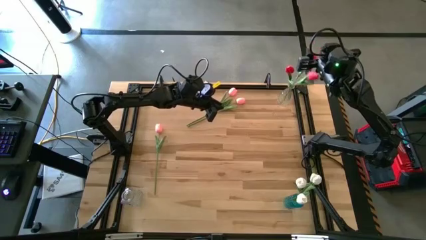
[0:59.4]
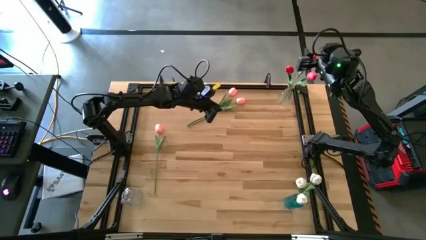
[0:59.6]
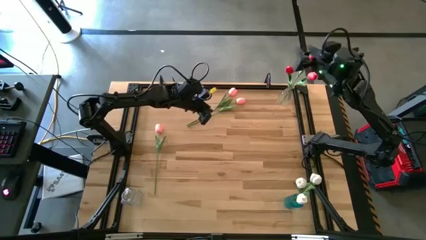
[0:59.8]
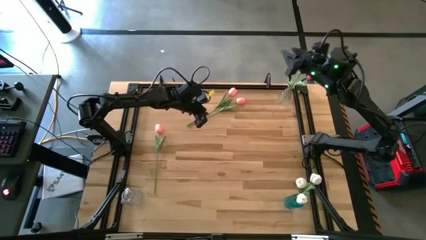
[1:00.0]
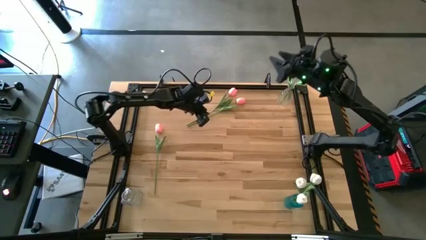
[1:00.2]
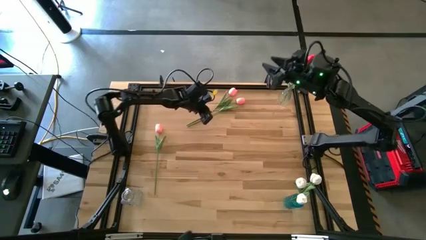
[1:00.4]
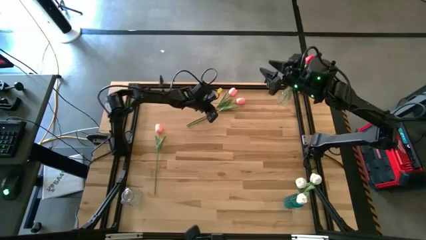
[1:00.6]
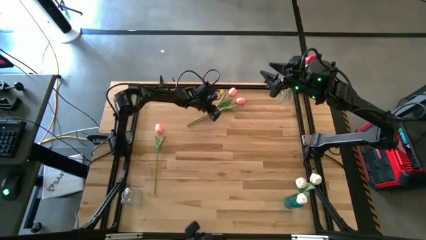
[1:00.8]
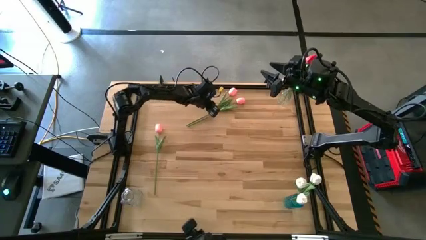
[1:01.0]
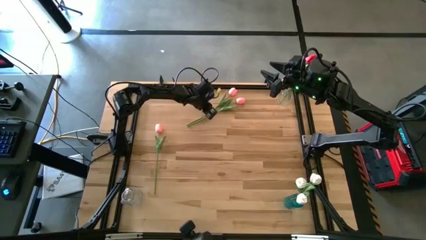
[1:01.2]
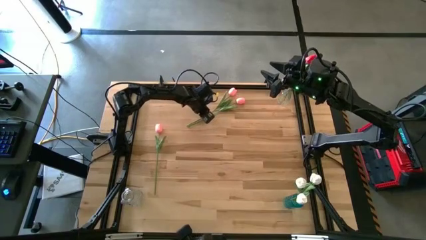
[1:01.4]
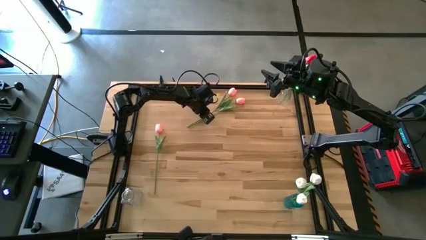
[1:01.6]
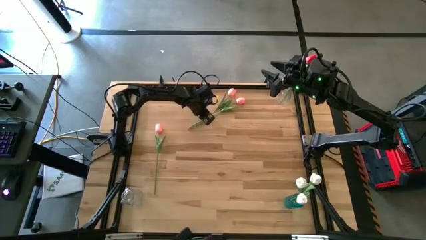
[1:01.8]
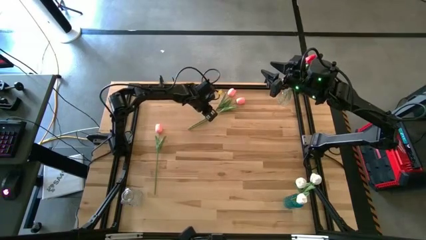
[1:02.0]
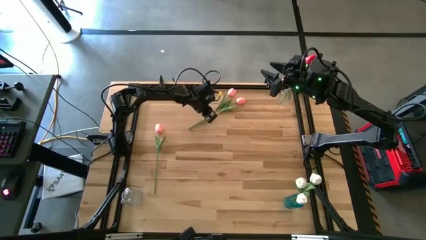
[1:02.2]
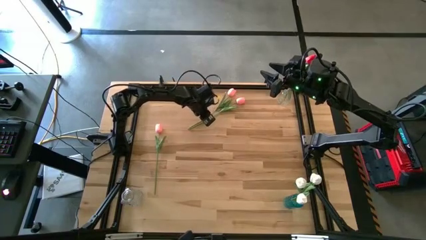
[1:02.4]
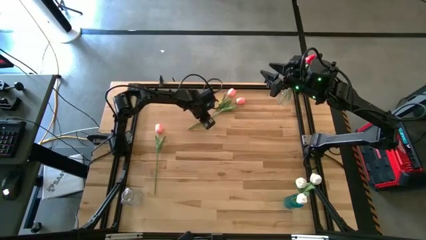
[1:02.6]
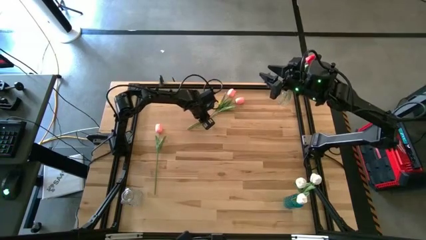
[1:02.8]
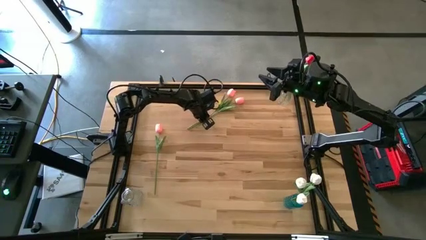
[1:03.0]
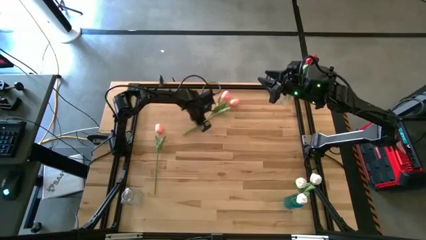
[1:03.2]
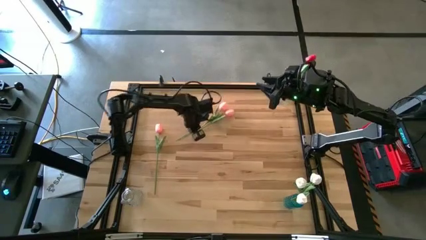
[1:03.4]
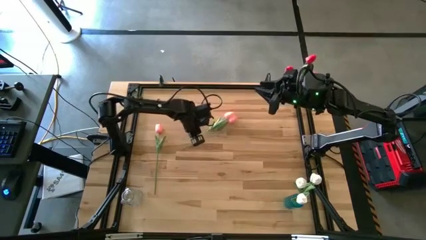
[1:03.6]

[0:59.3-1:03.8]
Task: Sort flowers into vase by color
Put the center pink flower into the bottom transparent vase

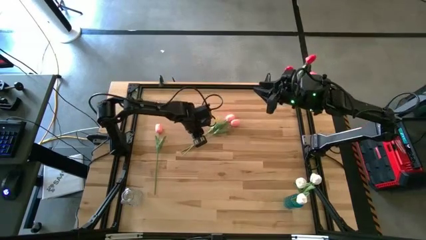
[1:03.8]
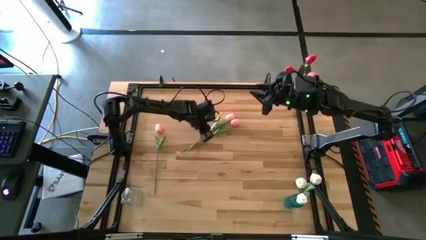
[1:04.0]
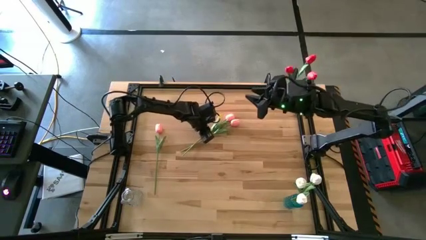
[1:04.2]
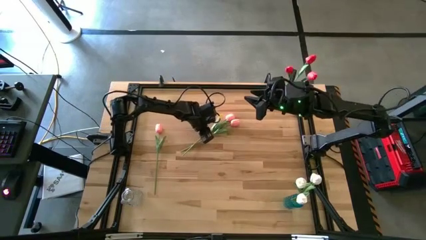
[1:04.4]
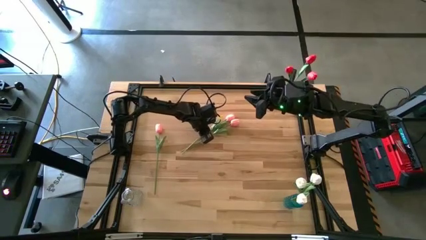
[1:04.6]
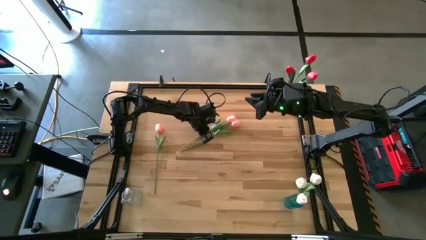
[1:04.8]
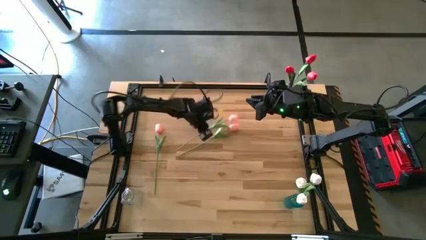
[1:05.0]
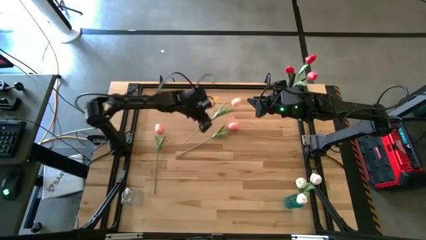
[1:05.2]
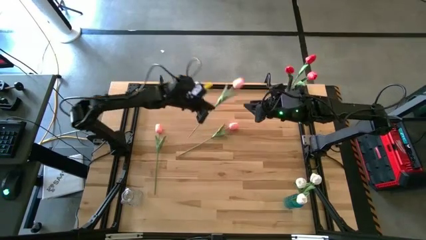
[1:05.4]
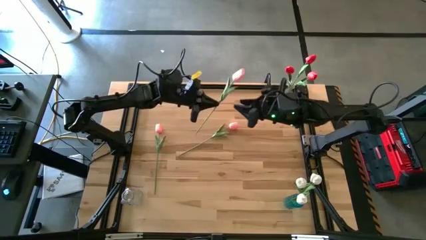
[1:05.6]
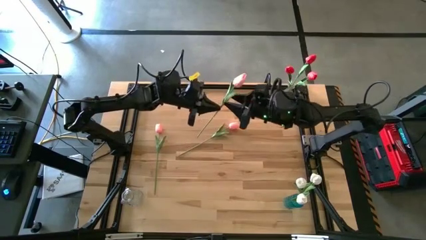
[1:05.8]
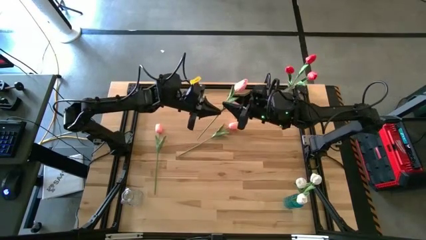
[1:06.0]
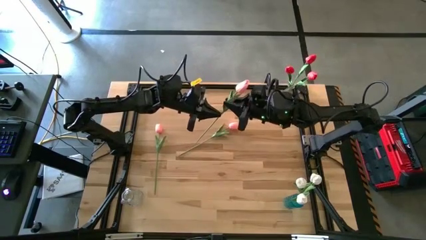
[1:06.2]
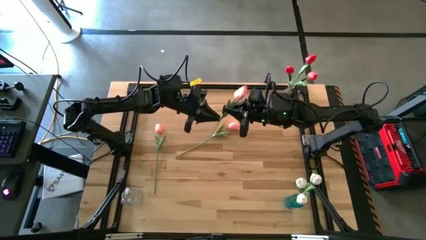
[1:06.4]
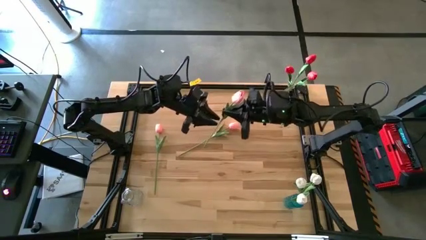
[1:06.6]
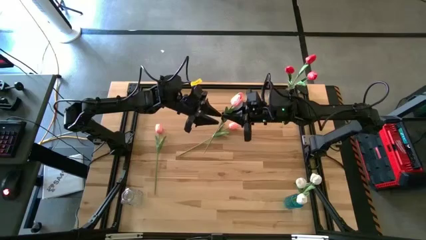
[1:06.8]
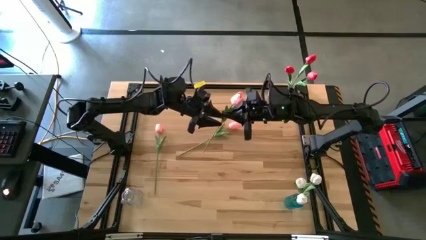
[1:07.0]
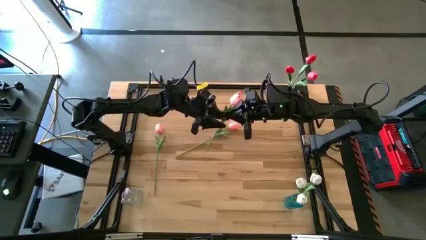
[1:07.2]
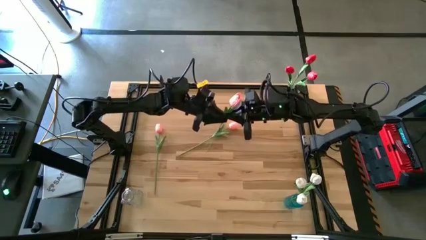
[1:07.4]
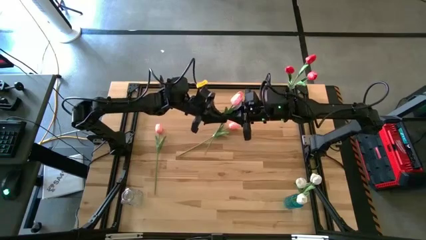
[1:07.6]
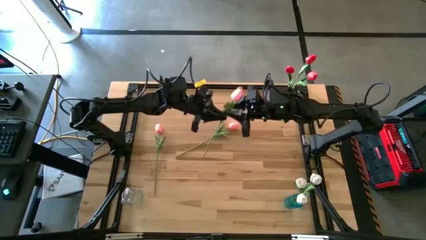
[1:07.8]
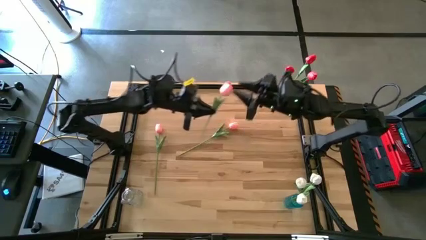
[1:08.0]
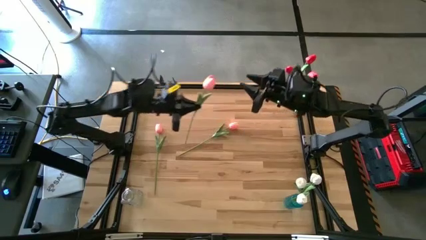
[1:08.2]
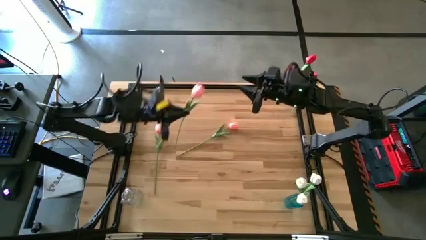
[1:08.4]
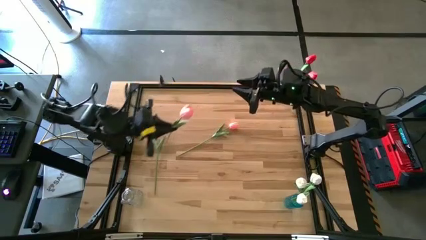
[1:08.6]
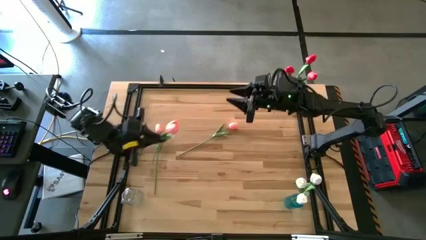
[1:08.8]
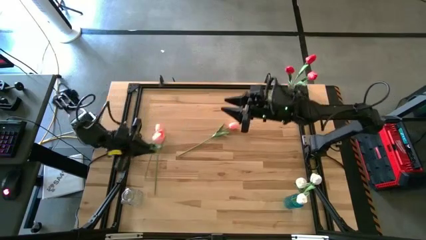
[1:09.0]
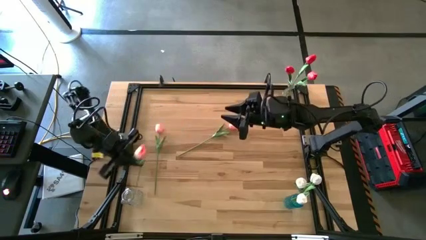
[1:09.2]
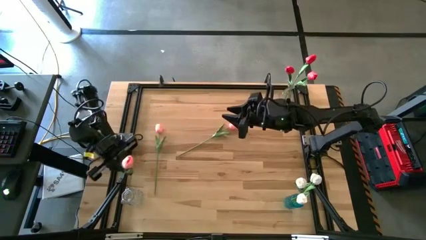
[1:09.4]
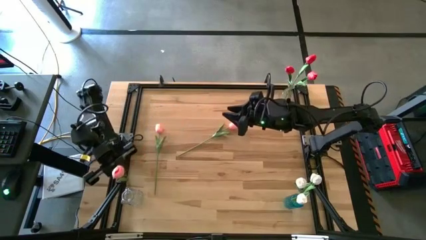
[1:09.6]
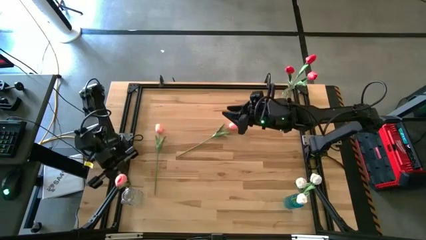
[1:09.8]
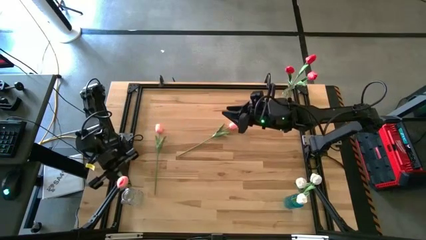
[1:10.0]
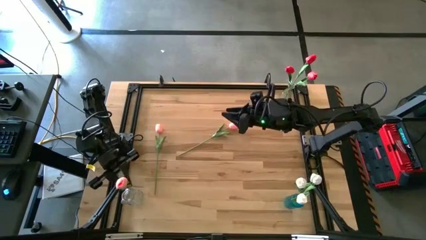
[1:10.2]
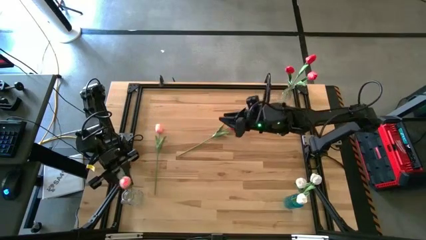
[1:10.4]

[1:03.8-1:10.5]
Put the center pink flower into the bottom transparent vase

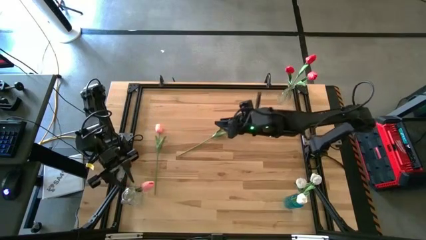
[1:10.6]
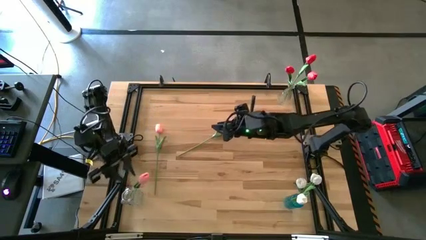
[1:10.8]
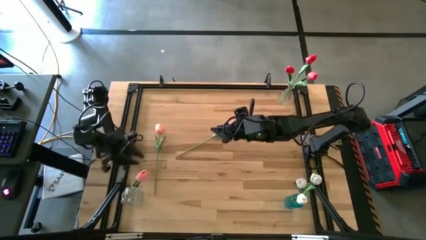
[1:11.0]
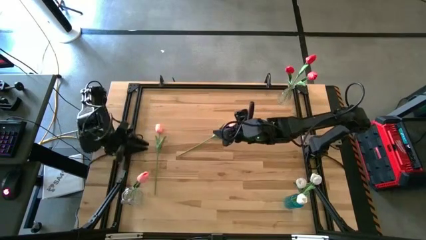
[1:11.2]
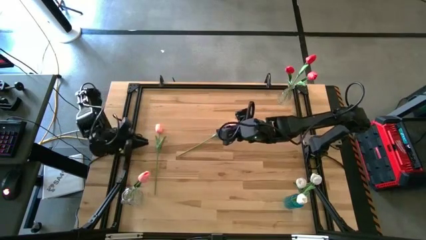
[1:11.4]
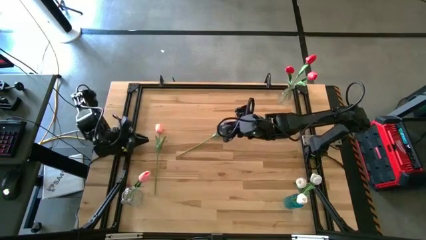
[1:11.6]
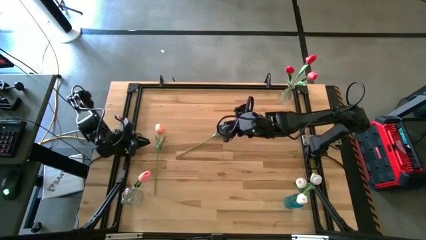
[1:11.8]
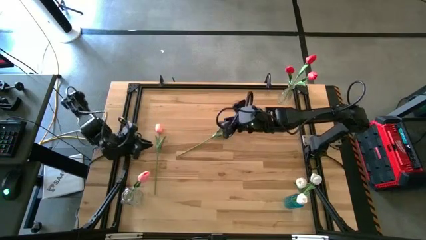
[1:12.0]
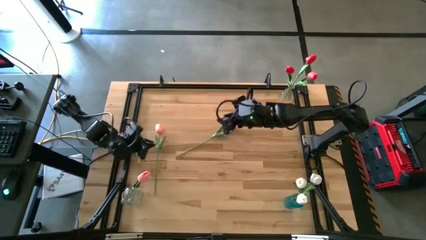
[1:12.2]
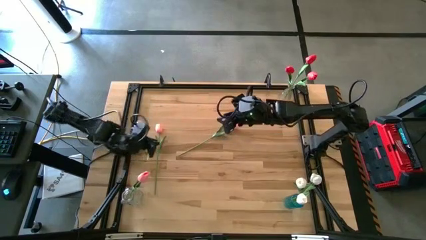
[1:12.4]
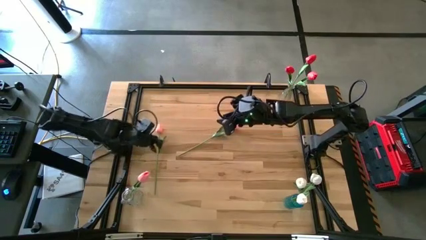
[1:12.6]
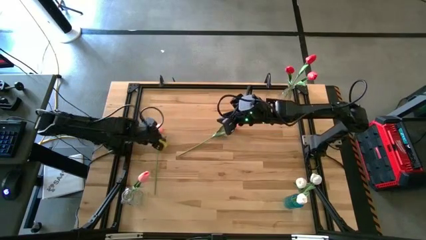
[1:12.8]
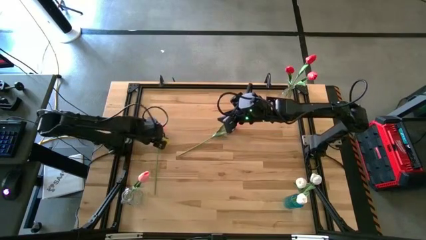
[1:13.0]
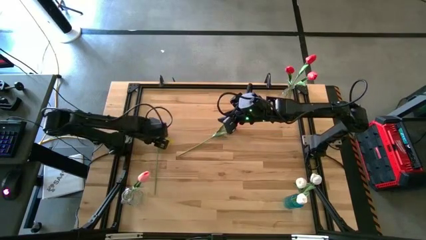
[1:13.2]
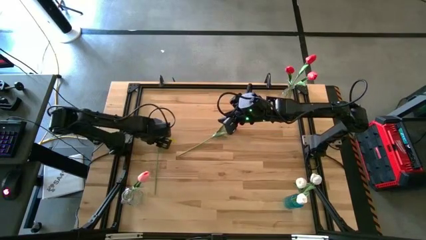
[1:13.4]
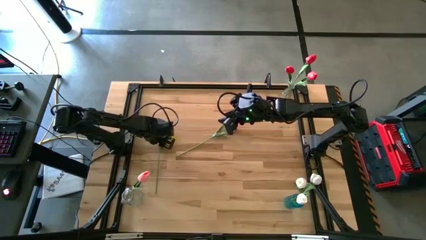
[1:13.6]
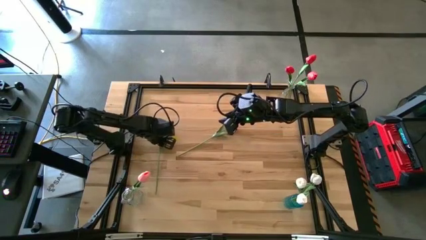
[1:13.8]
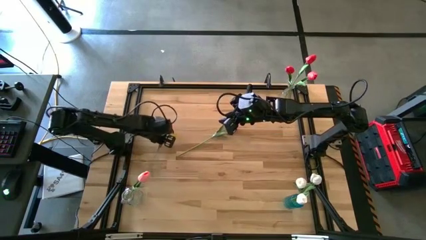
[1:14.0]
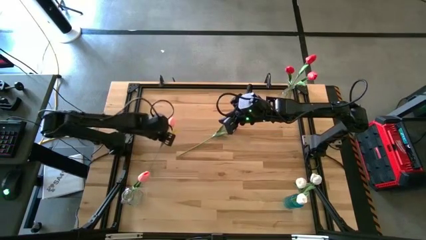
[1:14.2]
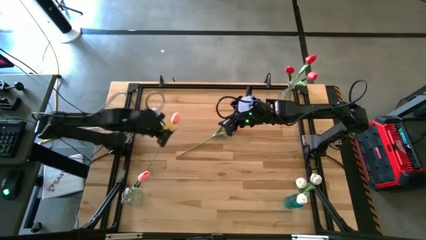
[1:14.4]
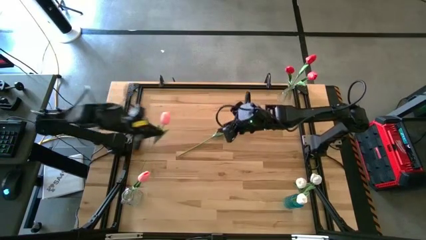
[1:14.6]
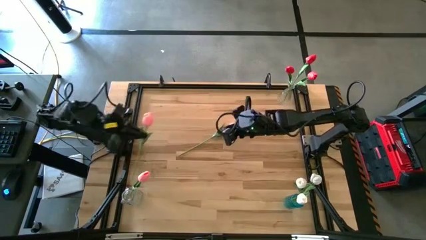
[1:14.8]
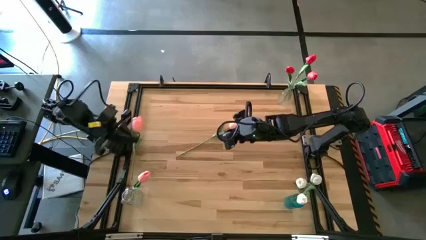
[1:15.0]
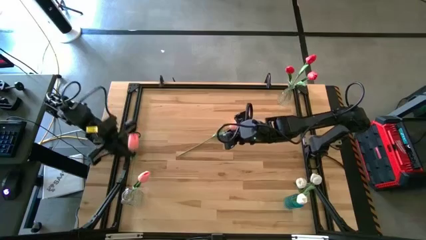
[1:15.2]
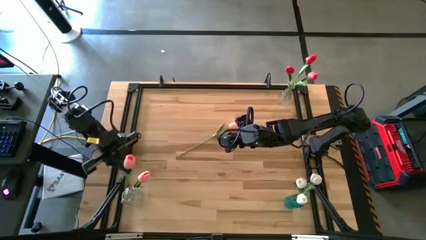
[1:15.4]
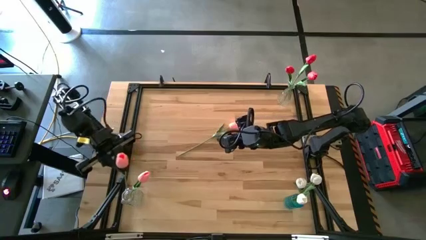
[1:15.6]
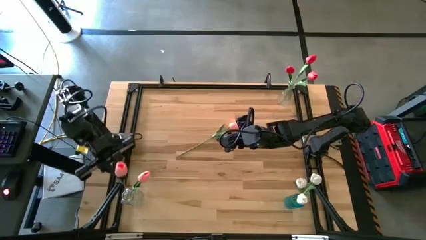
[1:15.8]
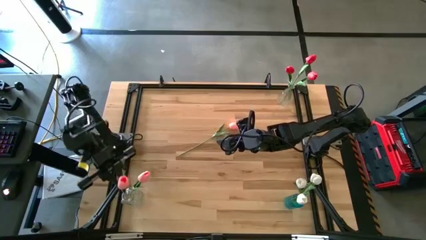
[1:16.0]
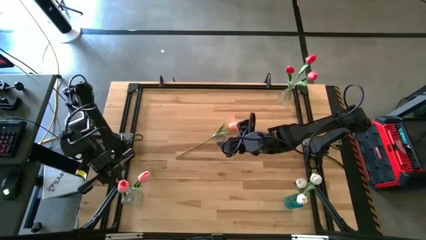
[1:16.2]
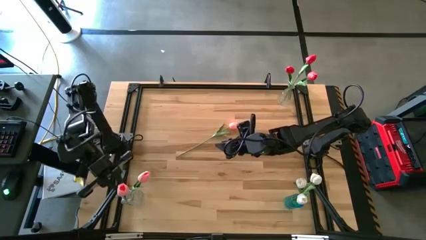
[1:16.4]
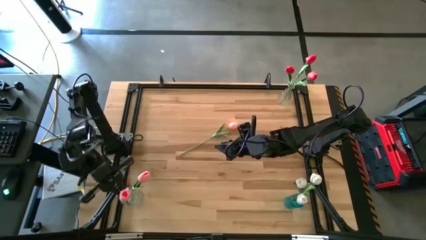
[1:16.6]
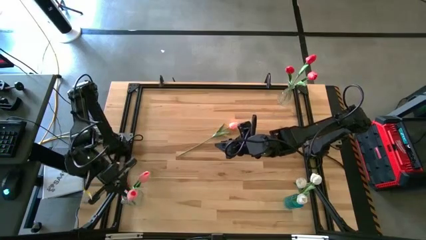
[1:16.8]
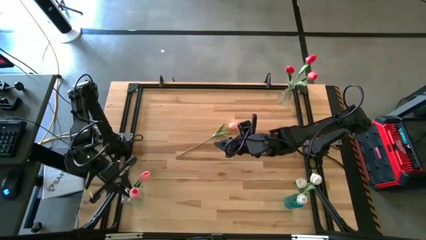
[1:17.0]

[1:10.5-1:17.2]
Put the left pink flower into the bottom transparent vase
